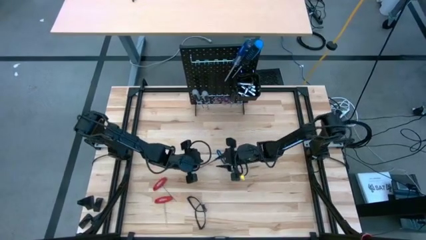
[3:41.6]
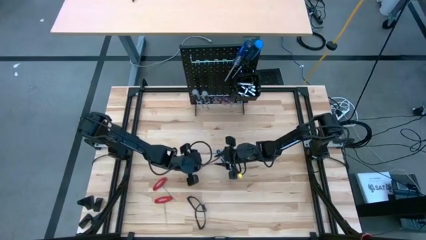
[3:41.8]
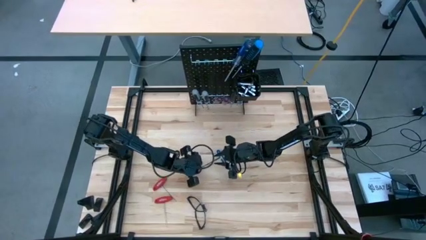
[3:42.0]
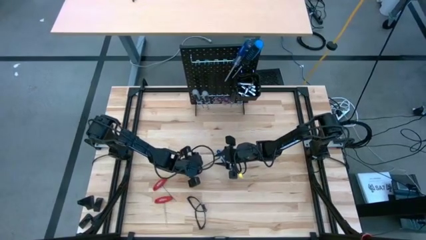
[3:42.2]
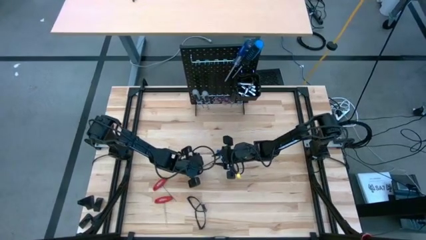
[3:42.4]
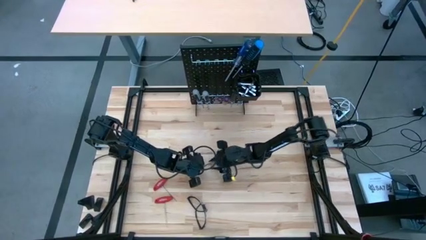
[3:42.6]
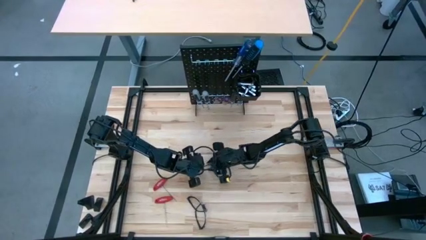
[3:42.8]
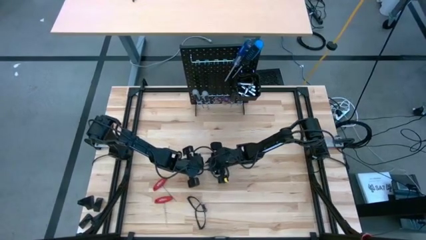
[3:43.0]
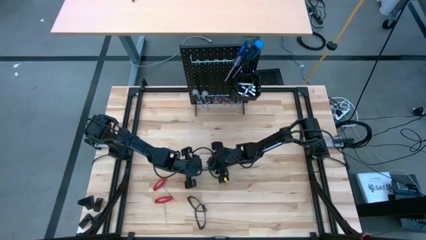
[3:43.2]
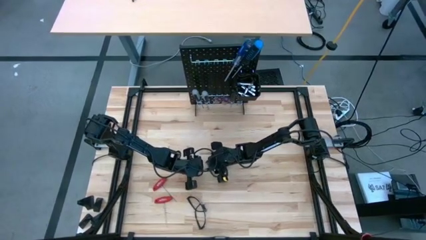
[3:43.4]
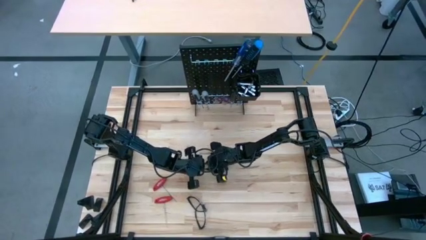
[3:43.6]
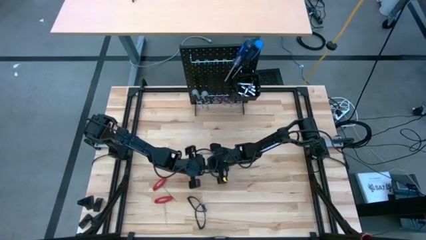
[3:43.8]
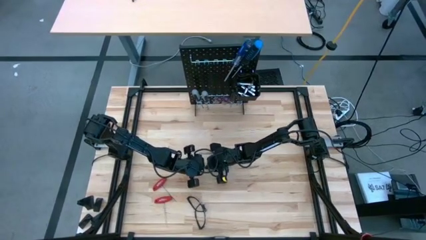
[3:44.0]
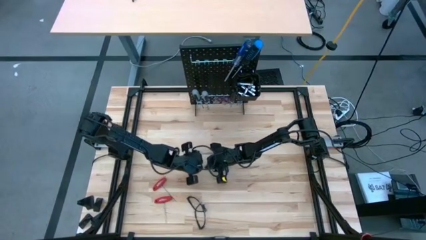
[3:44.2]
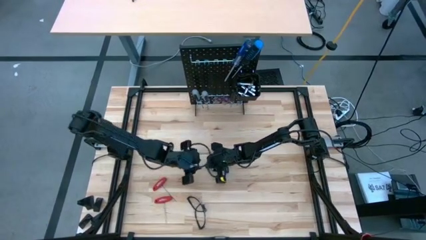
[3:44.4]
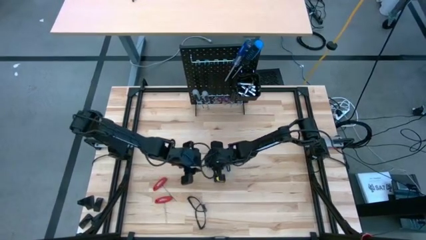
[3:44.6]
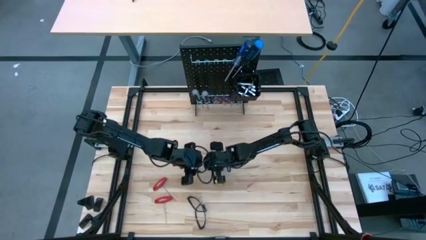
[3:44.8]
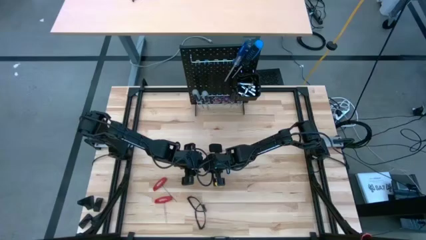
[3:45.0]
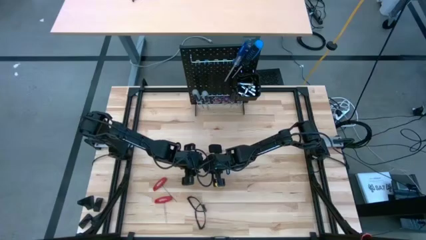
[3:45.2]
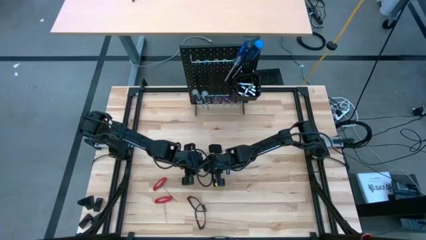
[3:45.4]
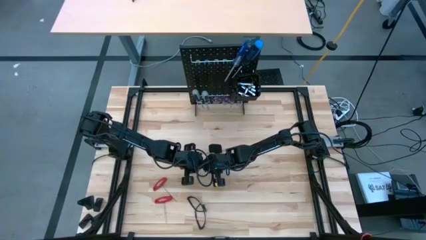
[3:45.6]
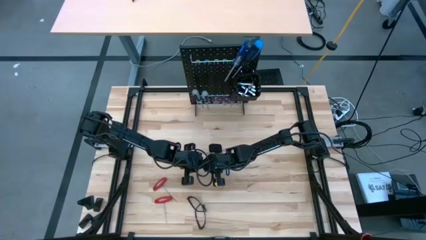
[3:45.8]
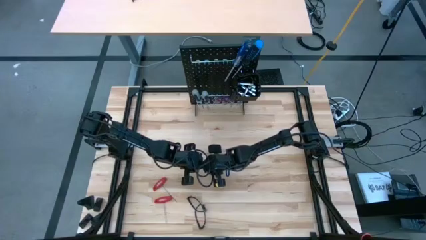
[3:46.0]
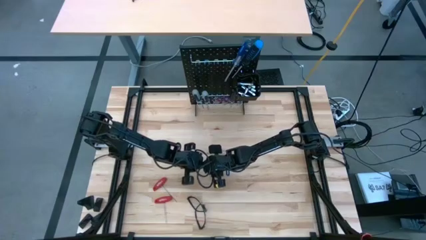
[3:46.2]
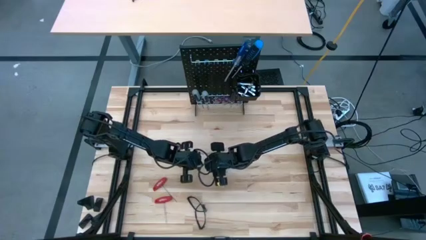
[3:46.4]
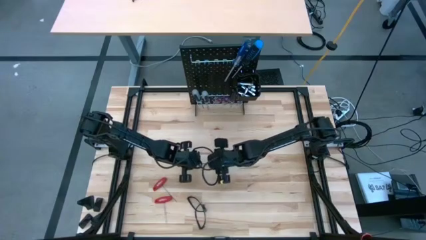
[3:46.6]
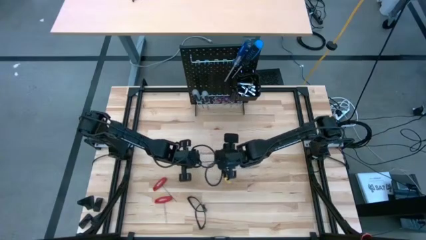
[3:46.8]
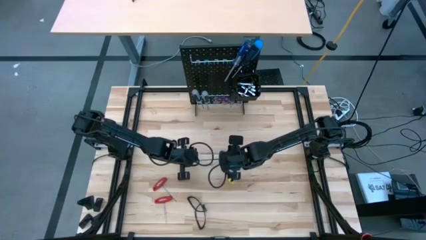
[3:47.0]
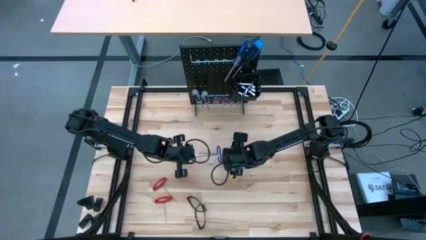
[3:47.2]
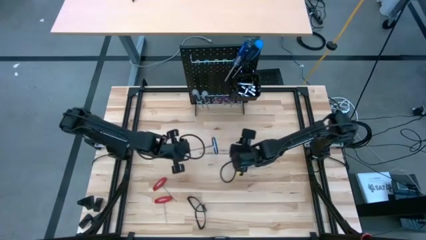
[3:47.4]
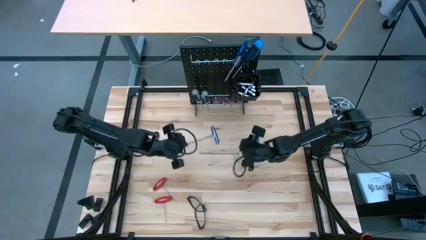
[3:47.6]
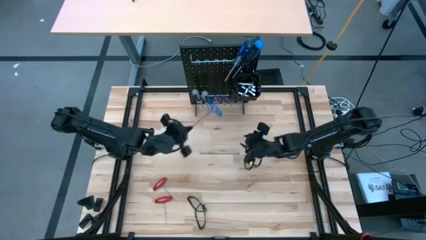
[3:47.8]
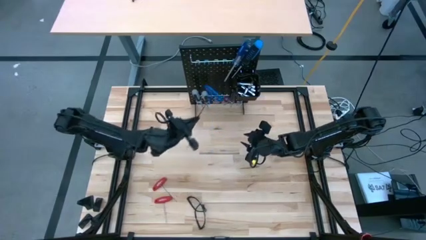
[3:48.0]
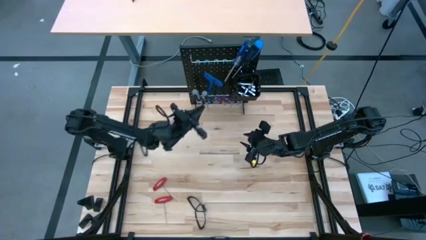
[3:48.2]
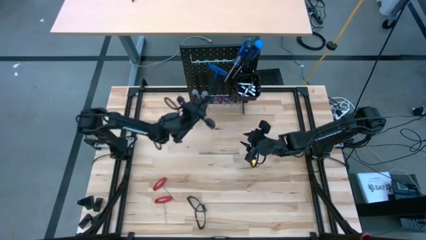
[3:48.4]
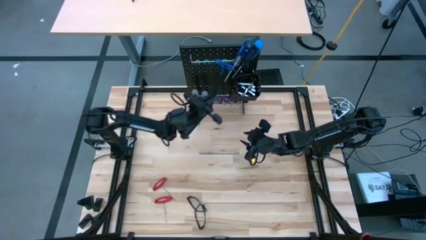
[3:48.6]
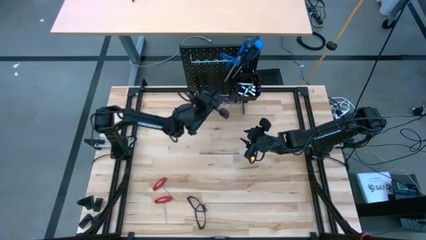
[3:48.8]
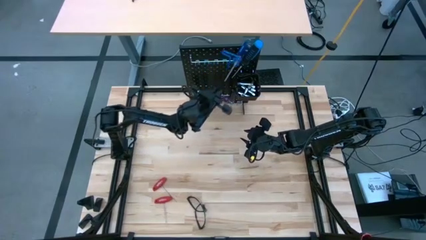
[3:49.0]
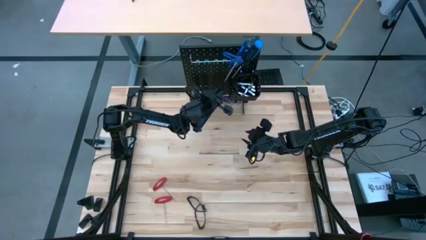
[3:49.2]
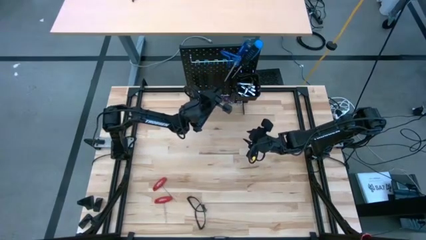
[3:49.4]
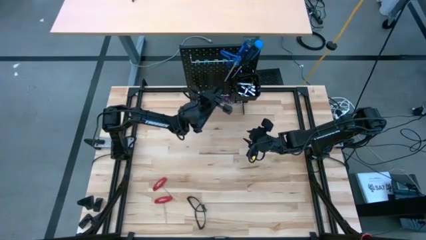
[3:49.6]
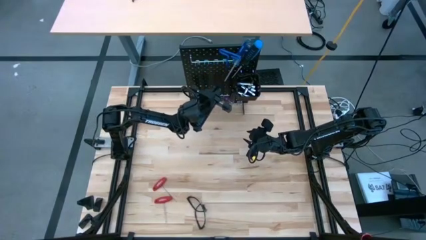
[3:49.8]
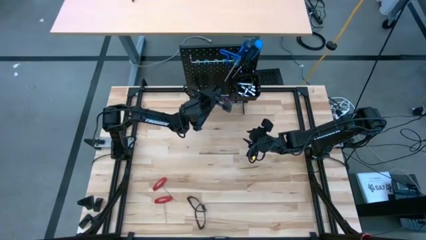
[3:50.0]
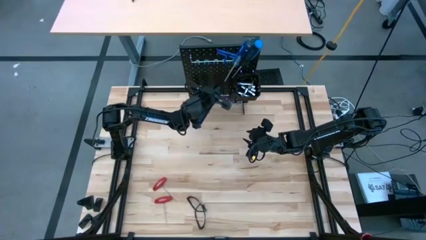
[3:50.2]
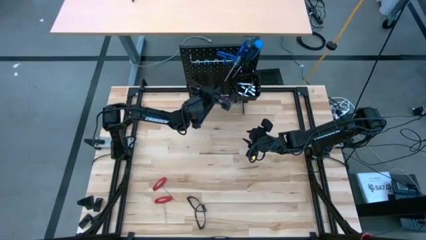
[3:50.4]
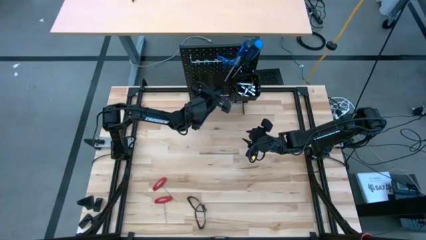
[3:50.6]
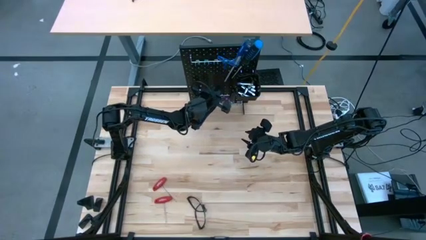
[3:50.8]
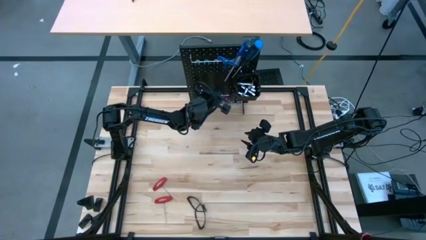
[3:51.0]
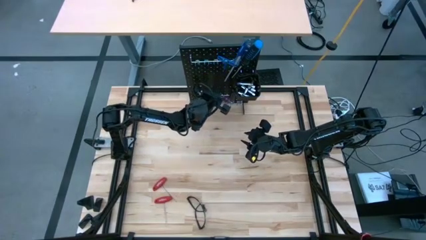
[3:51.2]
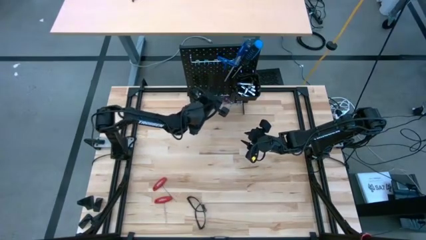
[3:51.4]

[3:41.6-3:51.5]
Task: Hang tools onto peg board
Hang the pick tool on the pegboard

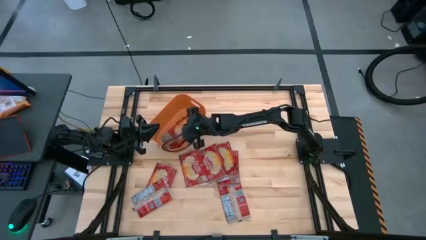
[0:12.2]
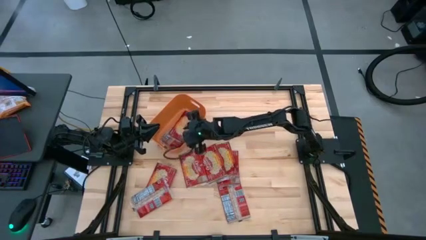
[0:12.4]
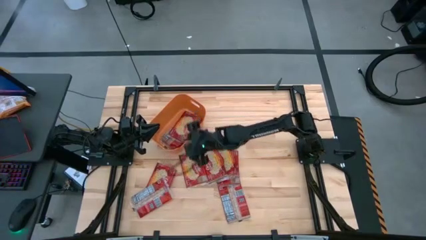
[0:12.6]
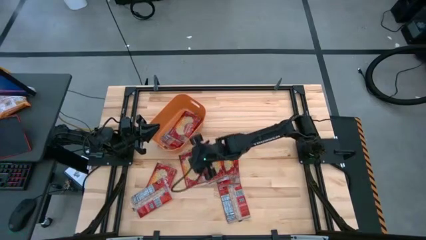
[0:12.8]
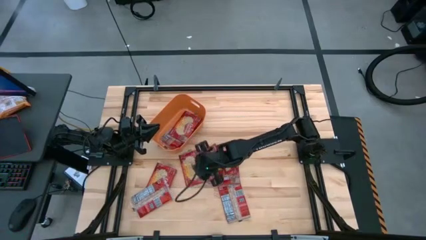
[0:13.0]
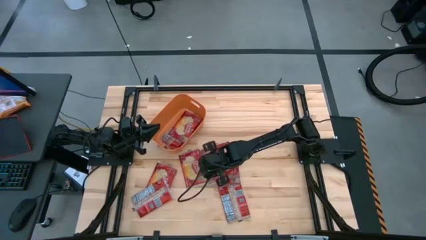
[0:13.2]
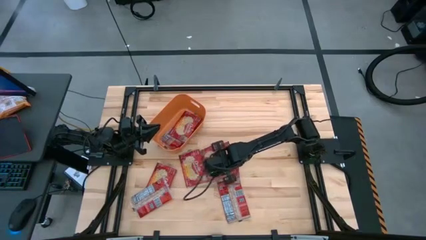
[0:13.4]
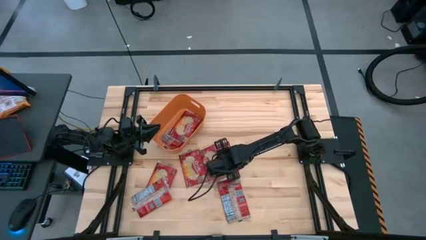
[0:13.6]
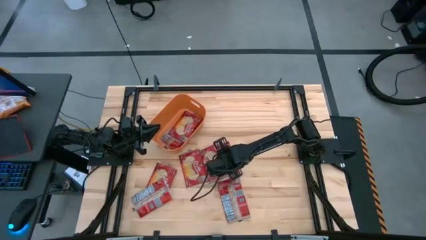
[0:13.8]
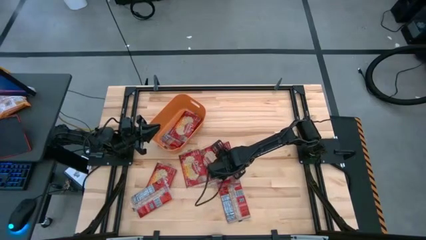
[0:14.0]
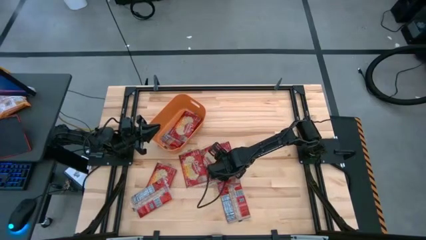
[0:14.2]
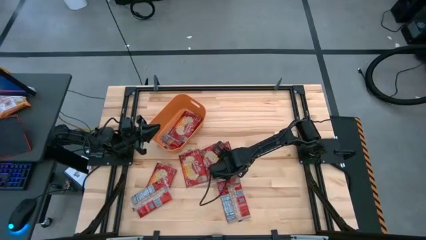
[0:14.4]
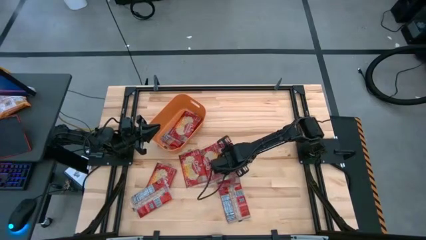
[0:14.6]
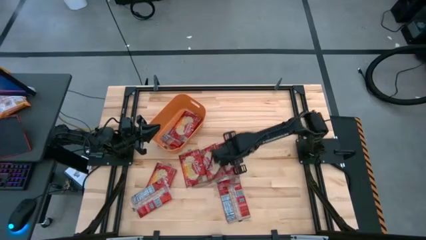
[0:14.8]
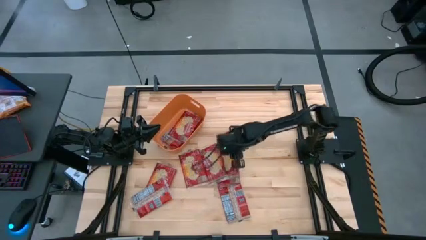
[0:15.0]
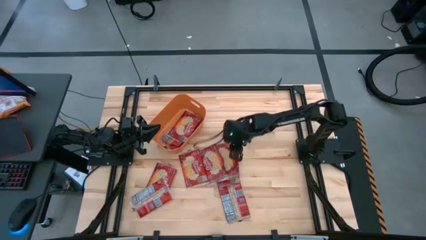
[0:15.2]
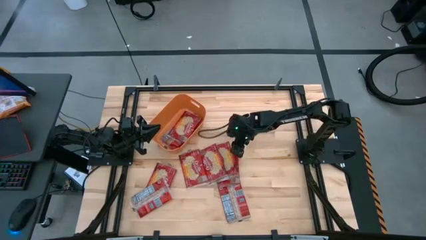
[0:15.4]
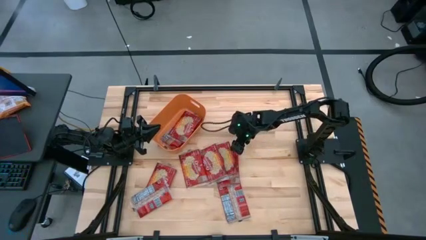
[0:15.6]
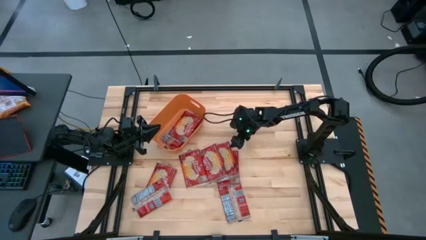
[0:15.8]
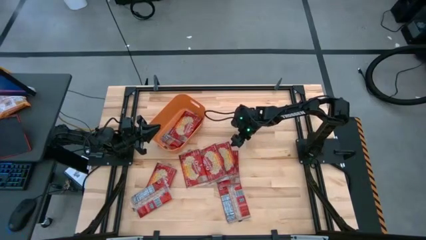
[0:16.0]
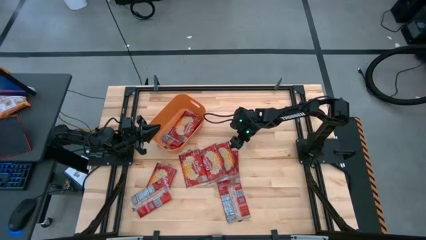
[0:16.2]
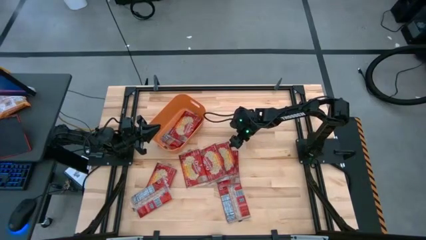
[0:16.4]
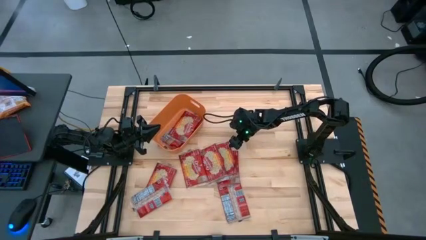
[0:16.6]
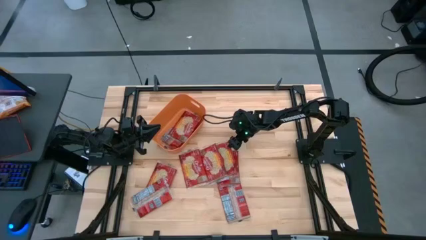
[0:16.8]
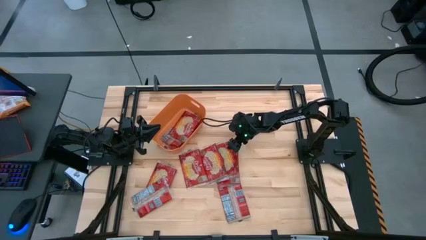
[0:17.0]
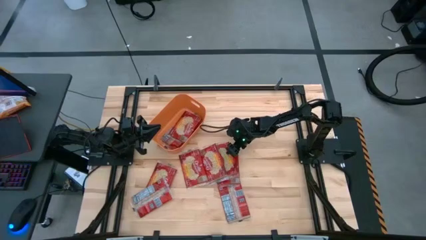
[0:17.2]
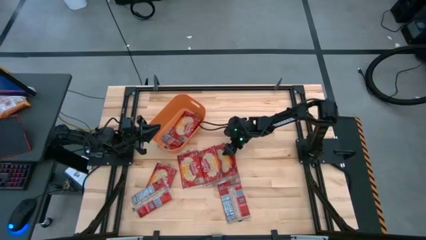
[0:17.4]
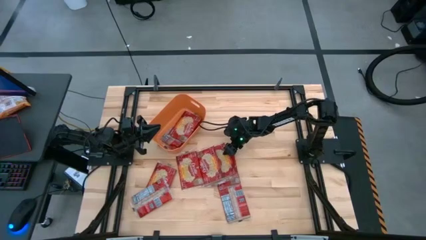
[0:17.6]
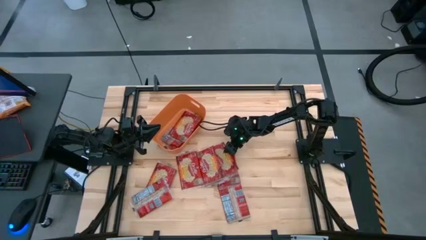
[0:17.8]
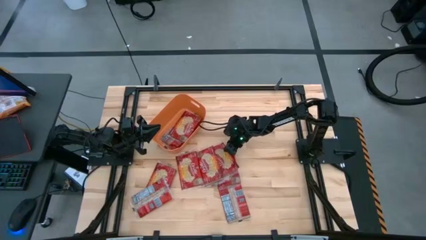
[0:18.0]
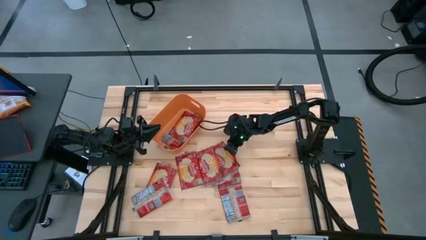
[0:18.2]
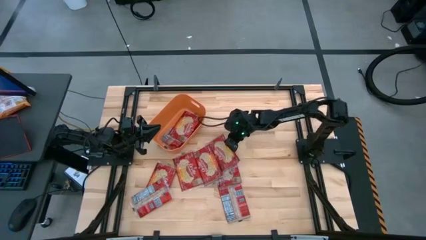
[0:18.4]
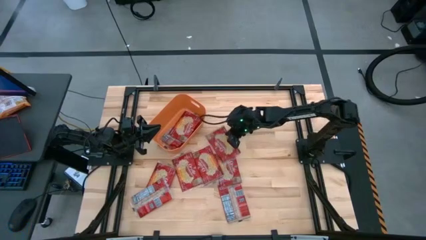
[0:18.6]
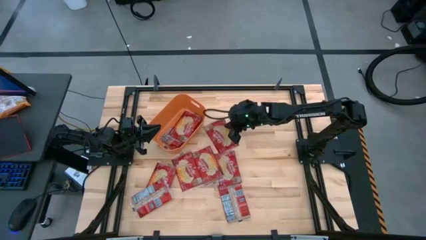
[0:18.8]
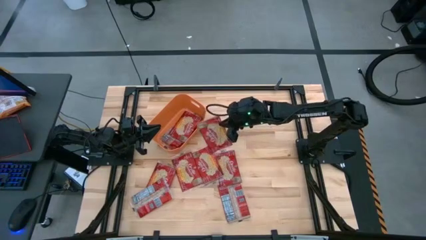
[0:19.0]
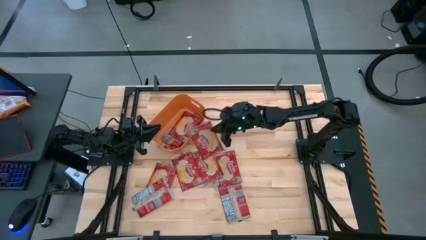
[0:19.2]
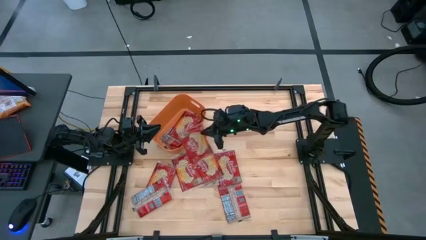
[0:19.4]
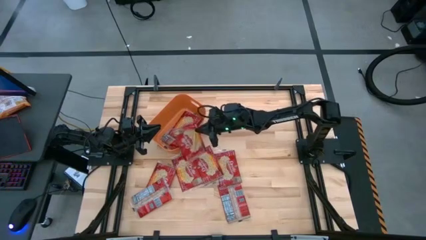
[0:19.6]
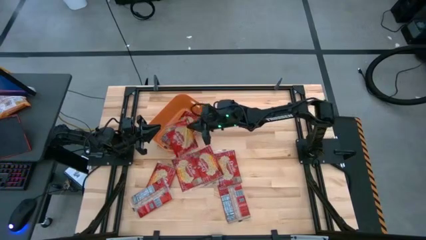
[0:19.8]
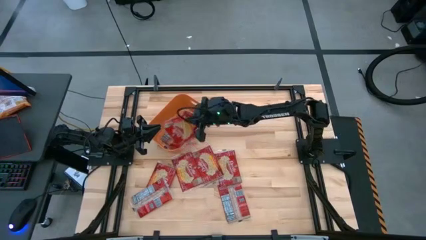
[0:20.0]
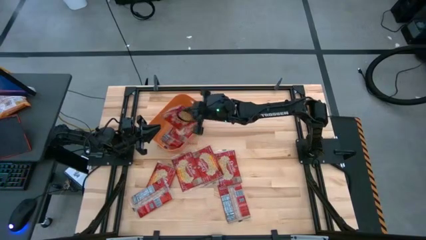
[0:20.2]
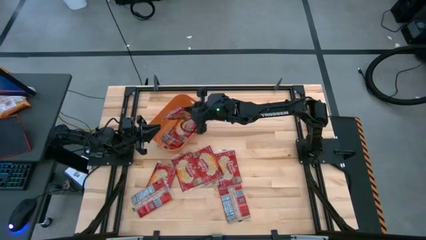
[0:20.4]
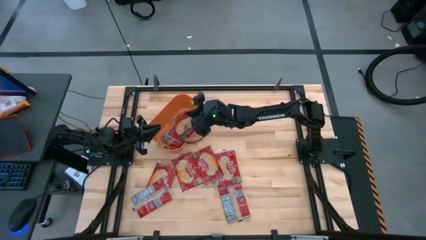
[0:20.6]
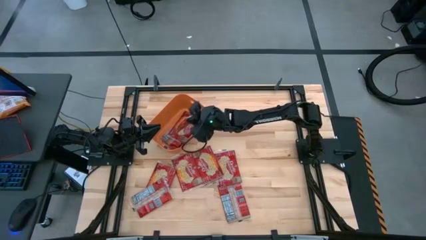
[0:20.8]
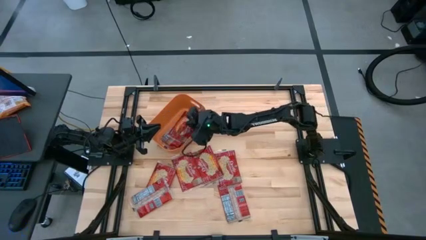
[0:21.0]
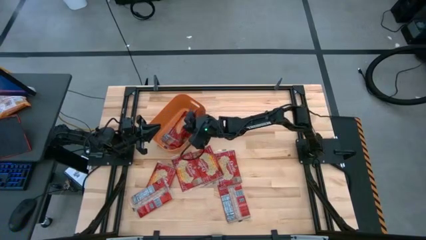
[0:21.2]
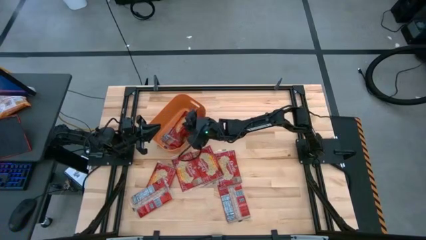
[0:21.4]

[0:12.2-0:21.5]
Task: Sort popcorn bags into baskets
Put the red popcorn bag into the orange bin
